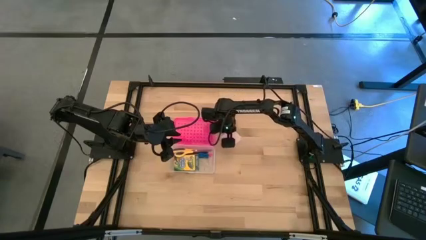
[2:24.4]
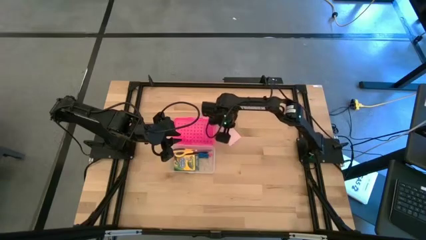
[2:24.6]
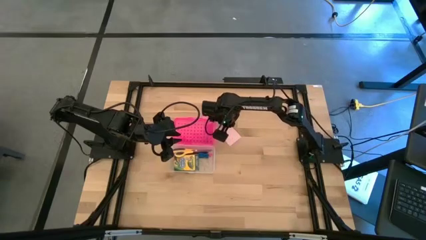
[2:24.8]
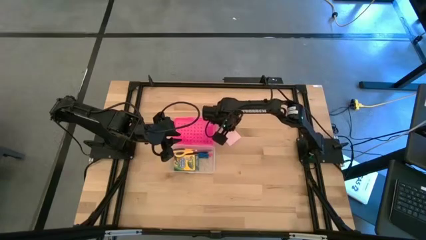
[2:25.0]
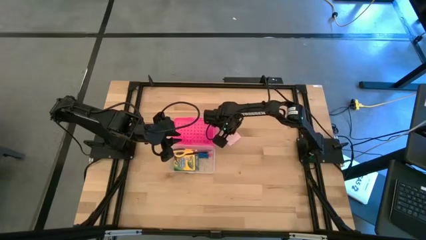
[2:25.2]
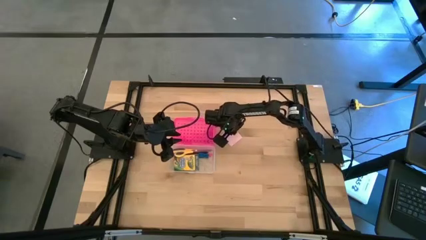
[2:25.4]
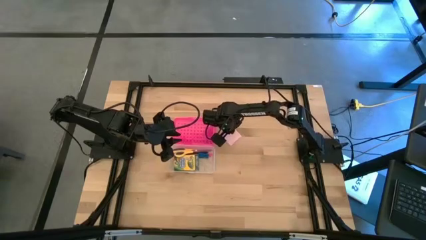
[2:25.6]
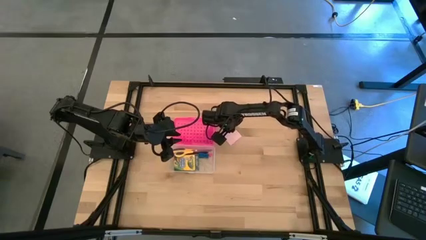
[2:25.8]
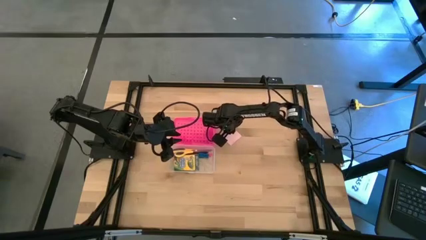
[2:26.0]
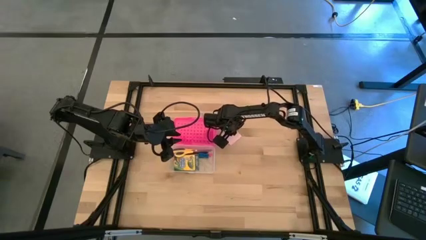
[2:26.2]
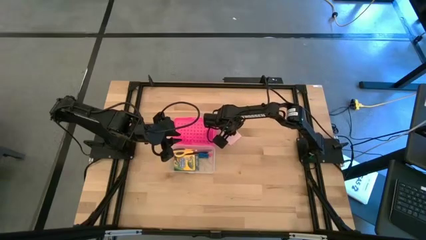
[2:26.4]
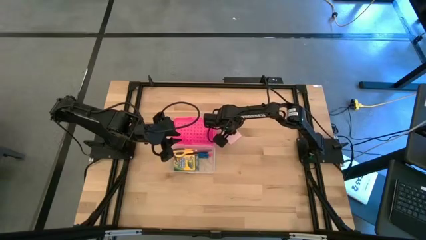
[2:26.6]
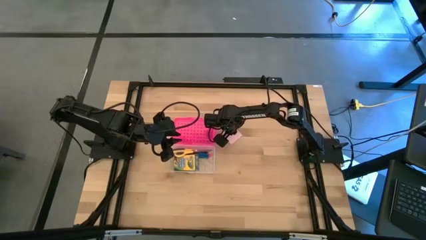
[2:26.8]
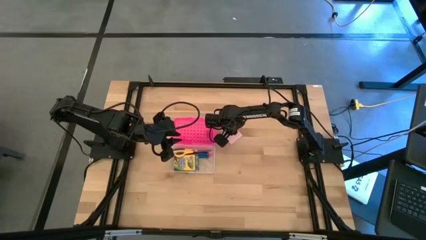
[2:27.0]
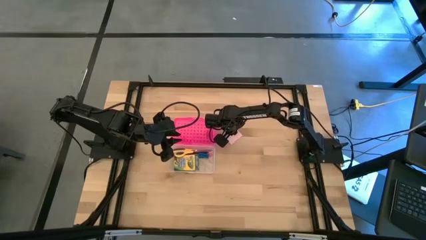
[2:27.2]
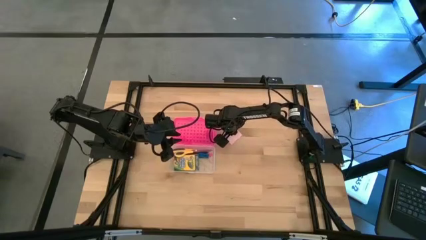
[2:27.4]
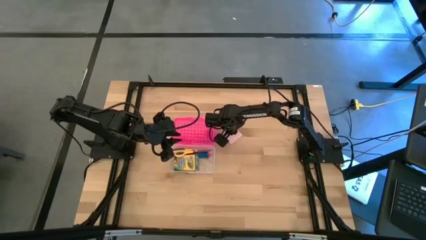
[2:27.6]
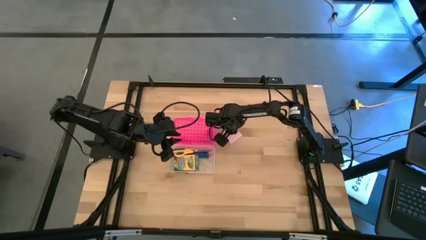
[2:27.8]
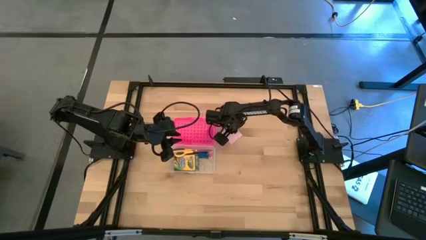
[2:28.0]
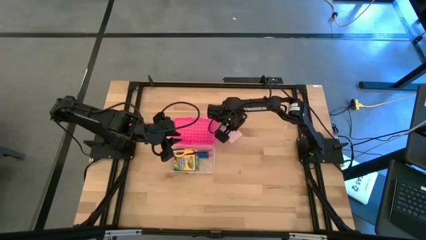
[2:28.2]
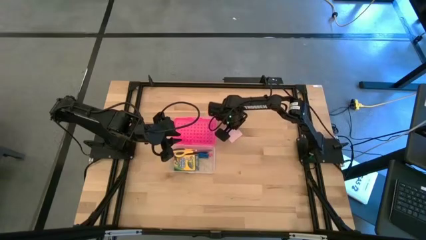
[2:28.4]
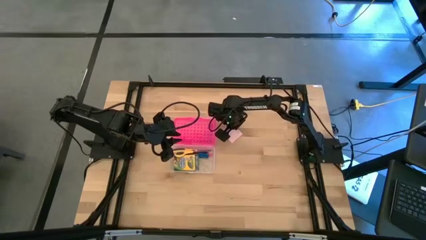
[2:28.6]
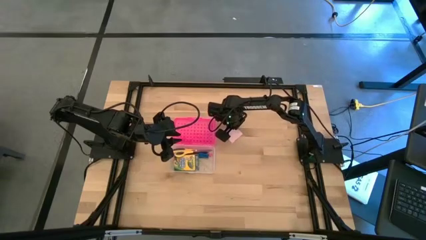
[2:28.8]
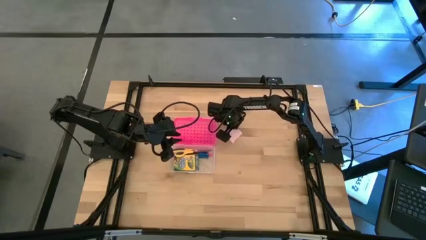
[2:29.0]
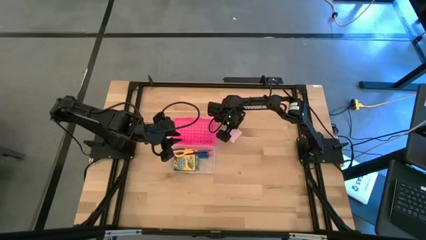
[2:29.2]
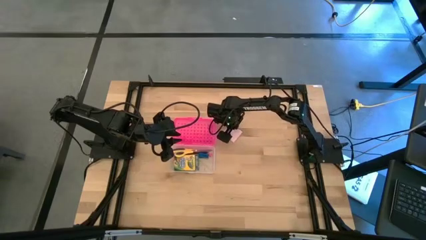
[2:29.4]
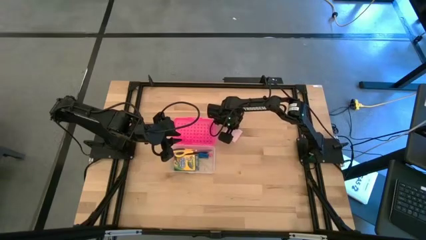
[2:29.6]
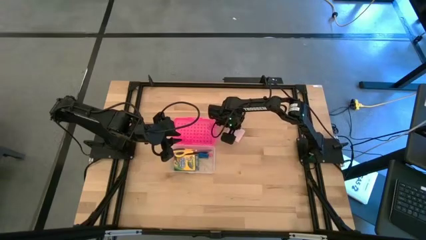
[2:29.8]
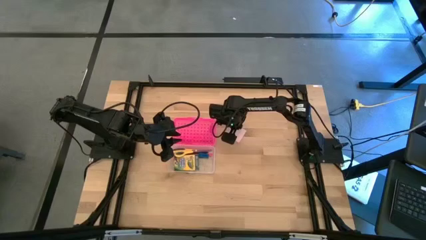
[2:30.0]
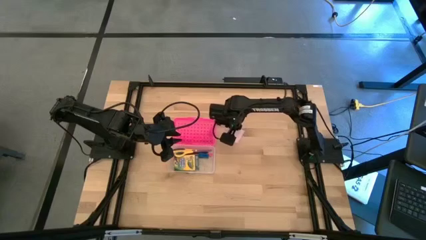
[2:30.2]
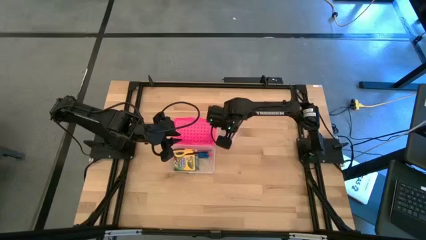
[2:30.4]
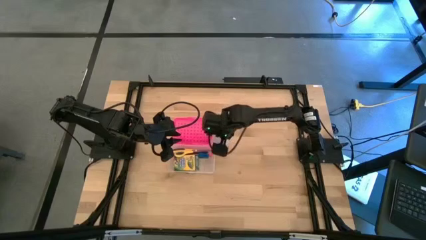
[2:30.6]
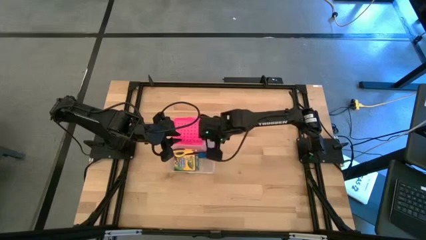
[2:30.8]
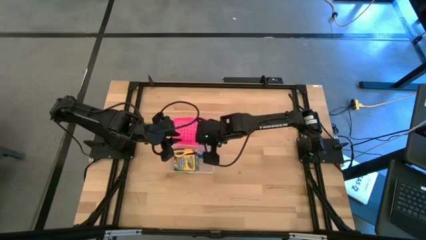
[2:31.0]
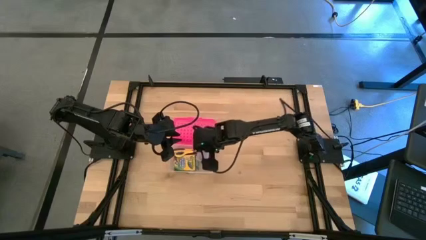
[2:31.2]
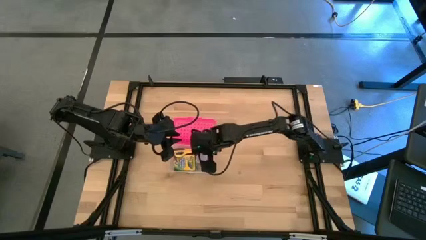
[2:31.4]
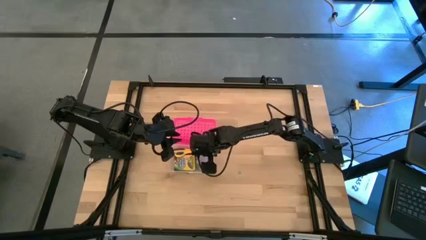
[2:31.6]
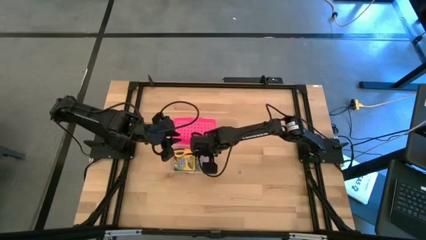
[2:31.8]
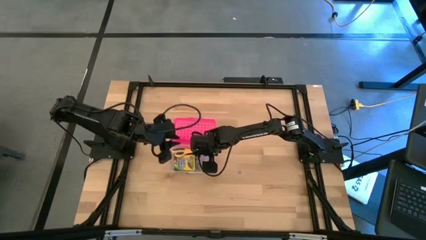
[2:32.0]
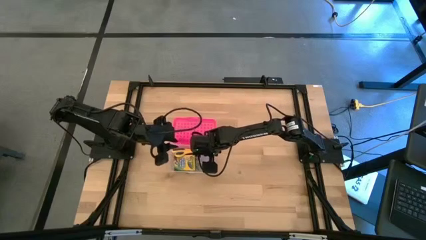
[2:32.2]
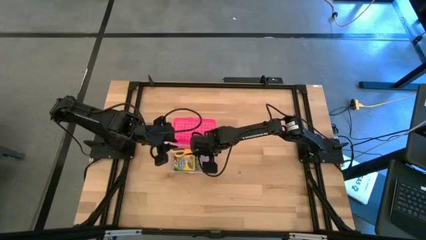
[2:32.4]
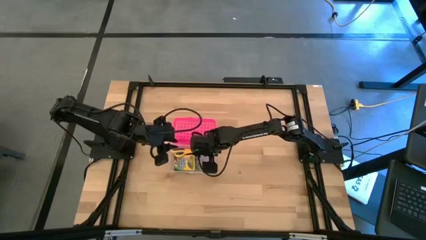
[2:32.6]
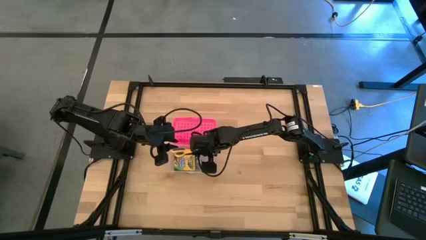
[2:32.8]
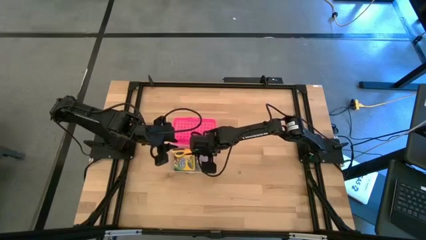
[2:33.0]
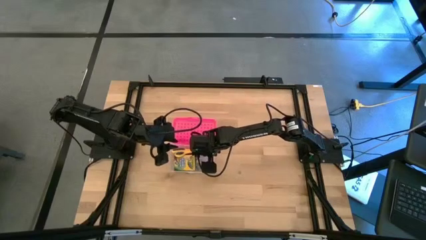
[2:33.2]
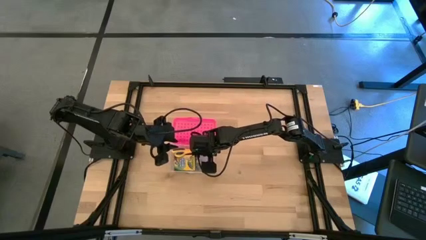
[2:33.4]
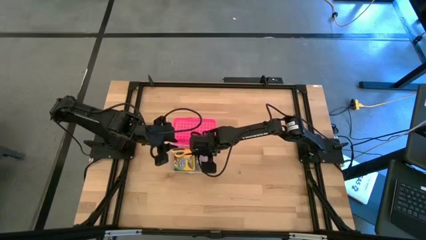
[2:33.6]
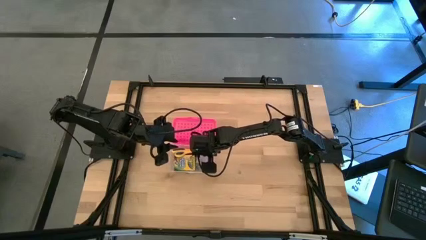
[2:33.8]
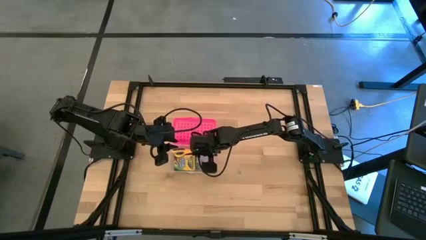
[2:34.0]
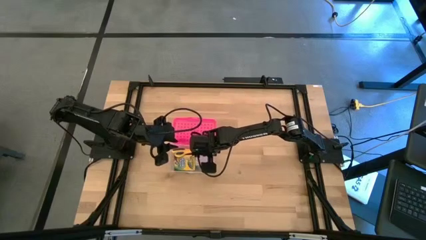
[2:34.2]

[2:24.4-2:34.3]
Task: Pack school essentials
Put the pink sticky note into the pink supply box

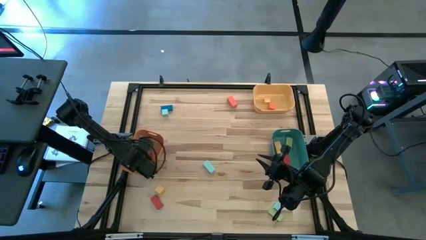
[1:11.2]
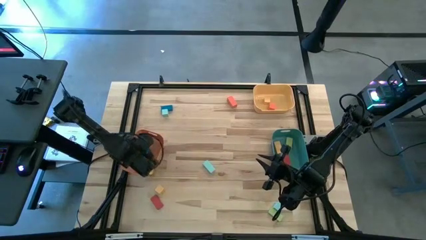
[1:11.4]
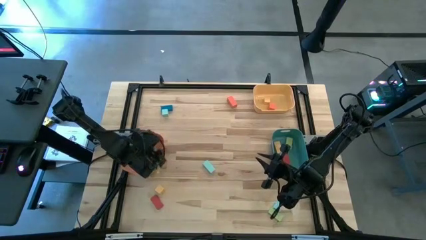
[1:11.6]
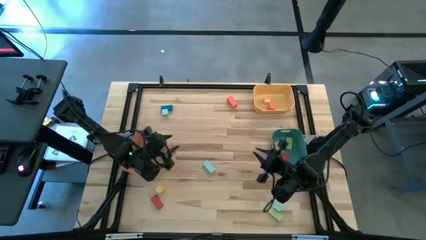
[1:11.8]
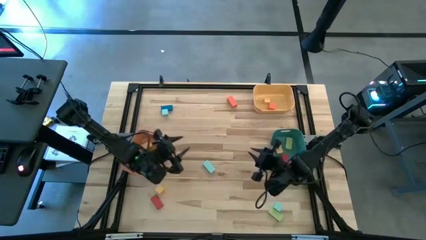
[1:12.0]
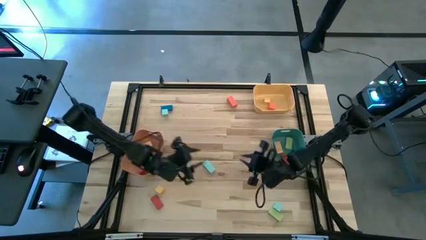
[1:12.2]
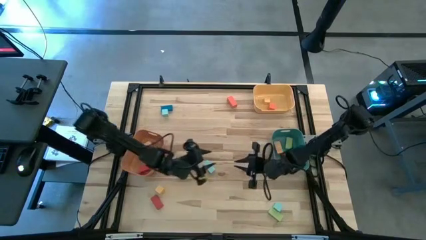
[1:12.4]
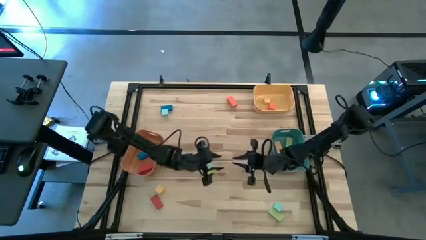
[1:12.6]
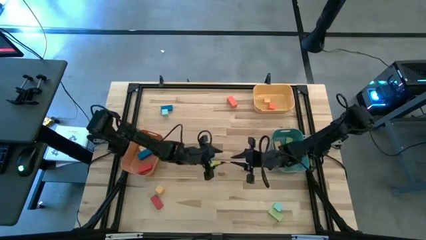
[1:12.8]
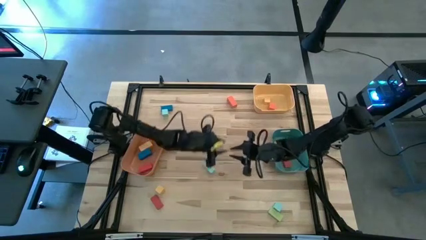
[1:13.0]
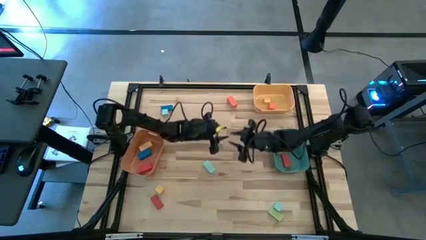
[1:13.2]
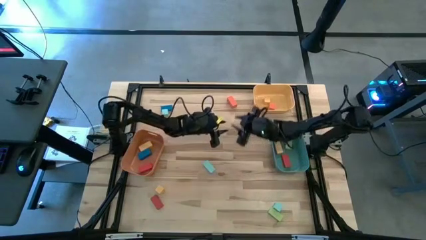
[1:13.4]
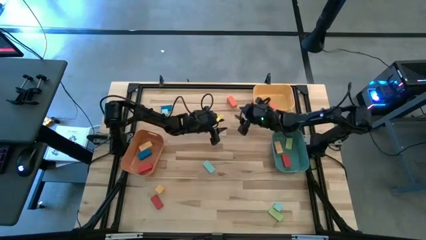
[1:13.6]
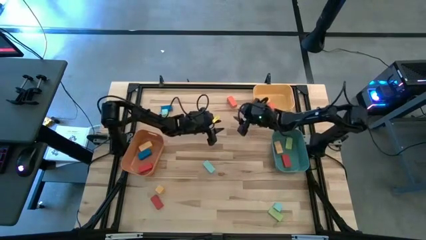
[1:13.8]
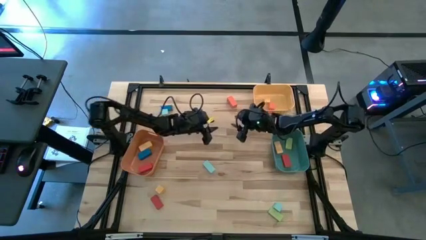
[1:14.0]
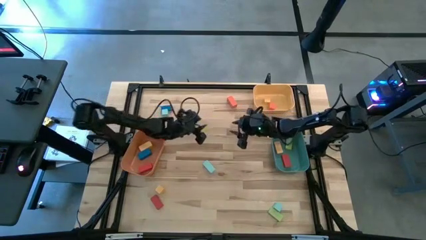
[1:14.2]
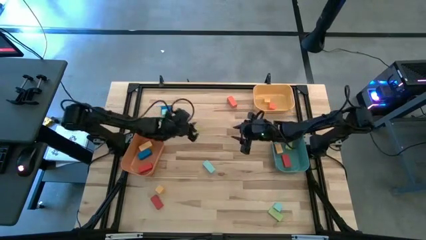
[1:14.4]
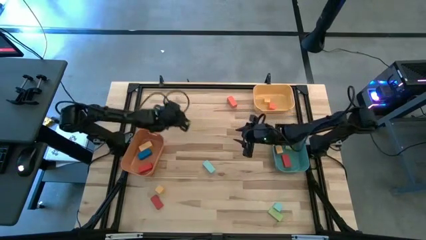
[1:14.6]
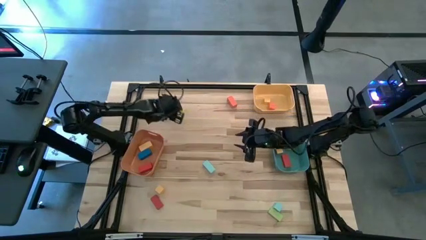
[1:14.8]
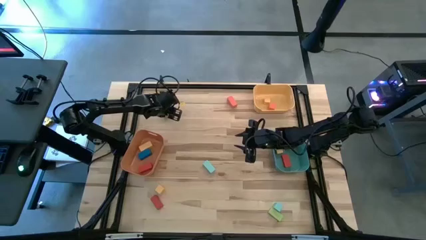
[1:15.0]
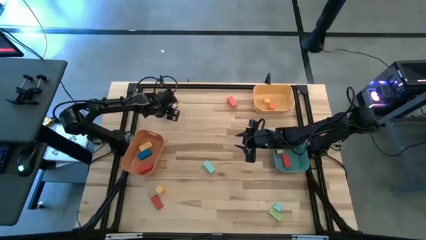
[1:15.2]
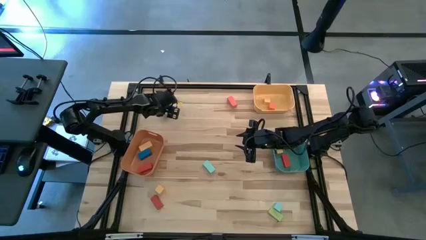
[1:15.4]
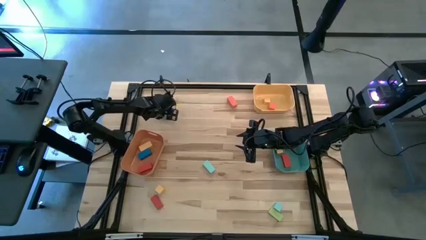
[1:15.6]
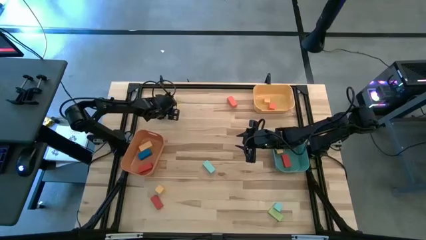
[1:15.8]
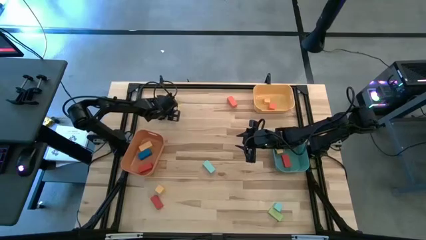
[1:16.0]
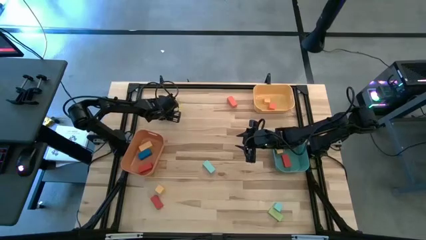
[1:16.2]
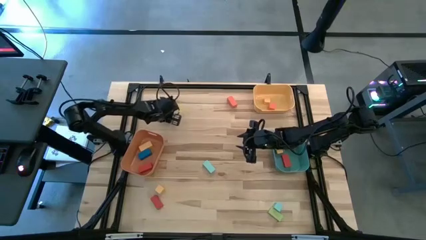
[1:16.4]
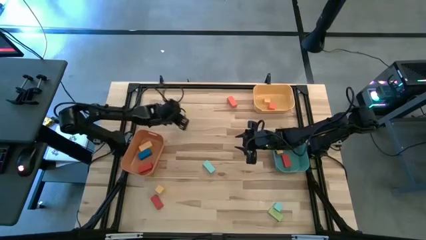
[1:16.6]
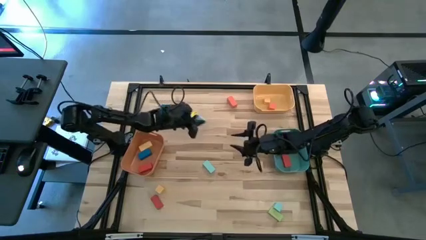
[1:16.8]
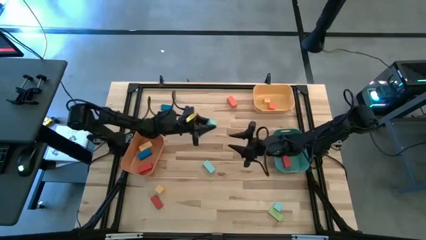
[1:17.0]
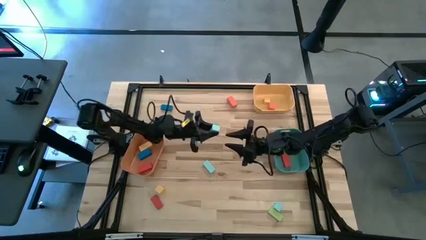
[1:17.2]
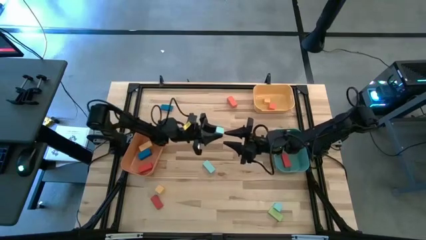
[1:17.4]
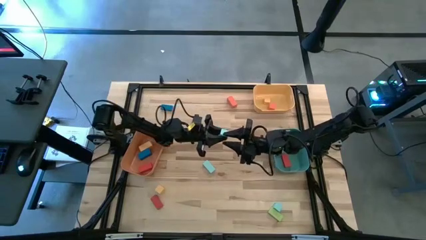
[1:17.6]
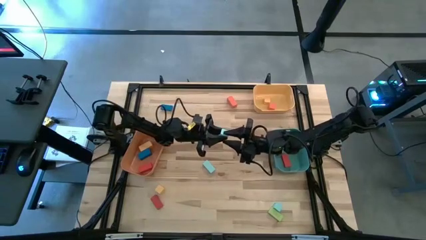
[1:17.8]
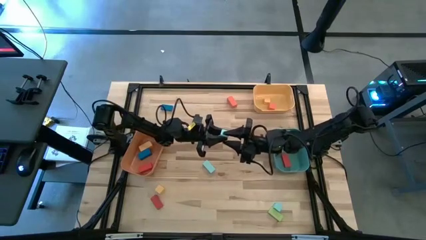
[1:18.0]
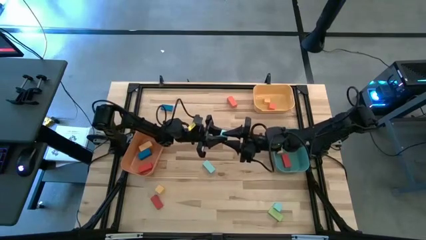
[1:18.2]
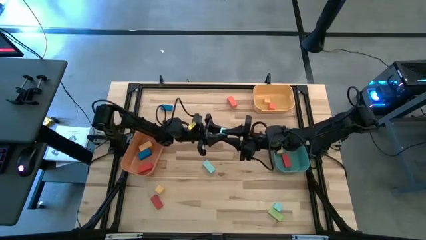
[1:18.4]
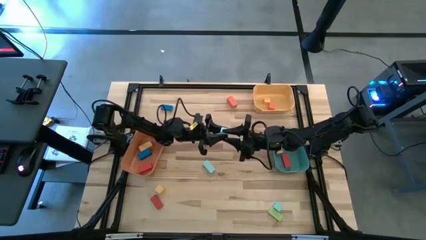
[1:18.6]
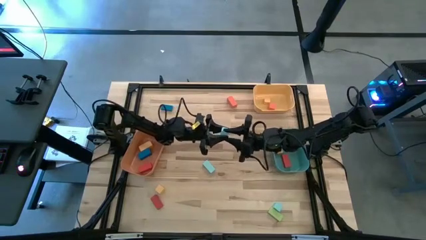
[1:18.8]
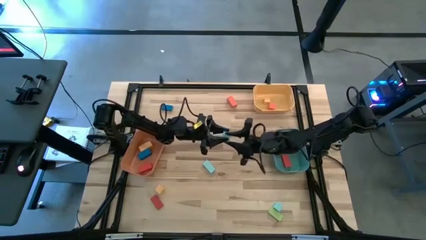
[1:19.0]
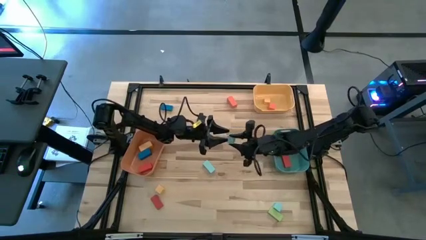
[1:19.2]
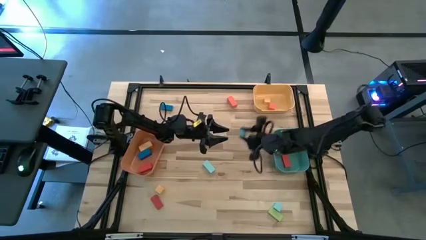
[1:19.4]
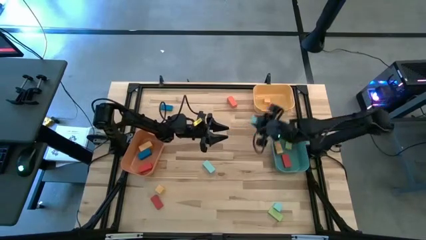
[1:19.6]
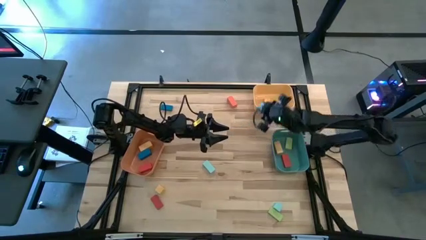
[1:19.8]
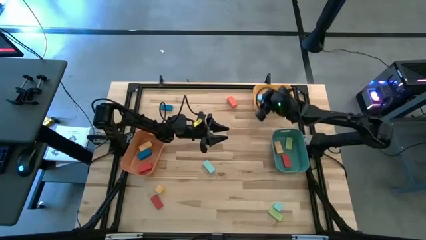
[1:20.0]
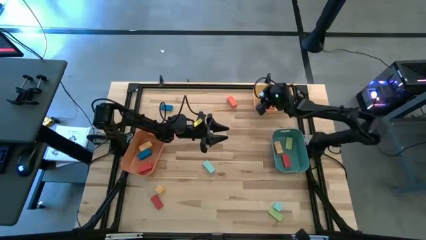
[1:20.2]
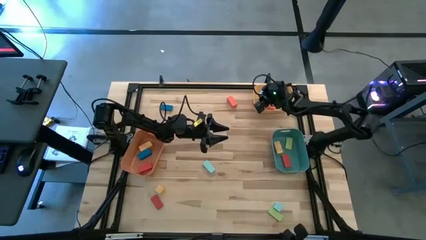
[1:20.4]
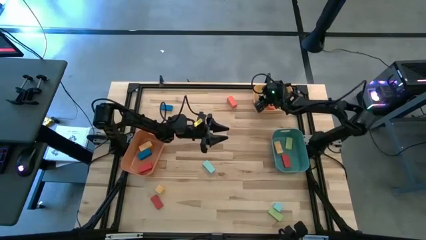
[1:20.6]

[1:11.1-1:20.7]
Task: Sort blocks by size
Put the top light blue cube block into the yellow bin
